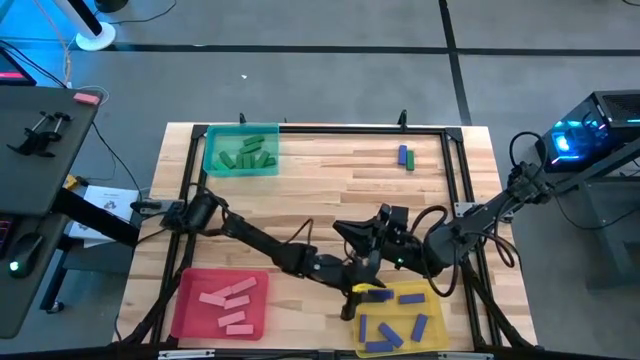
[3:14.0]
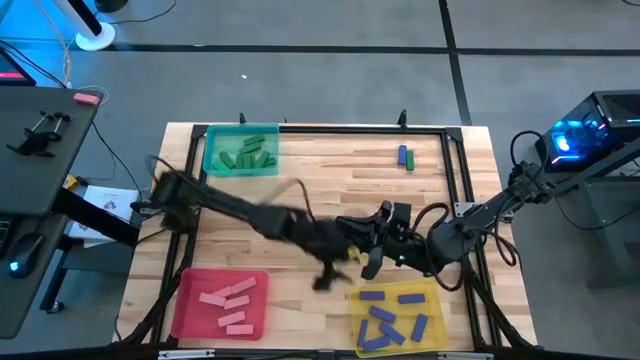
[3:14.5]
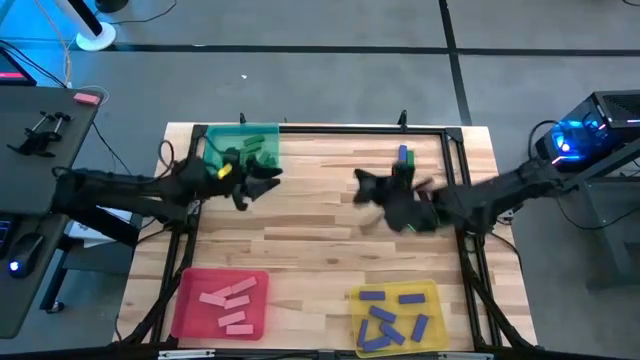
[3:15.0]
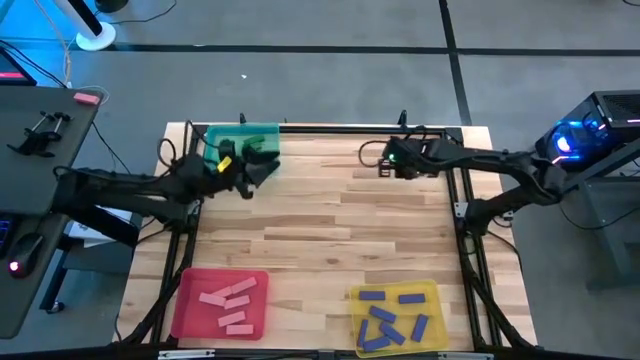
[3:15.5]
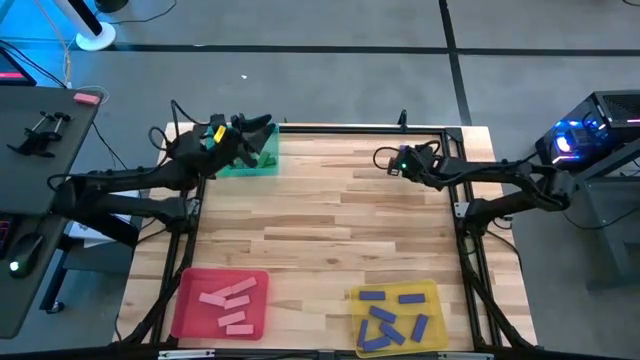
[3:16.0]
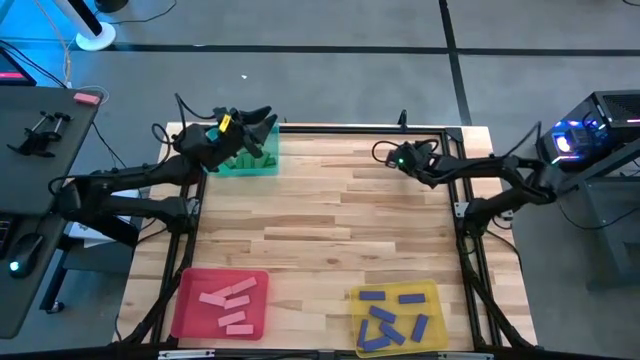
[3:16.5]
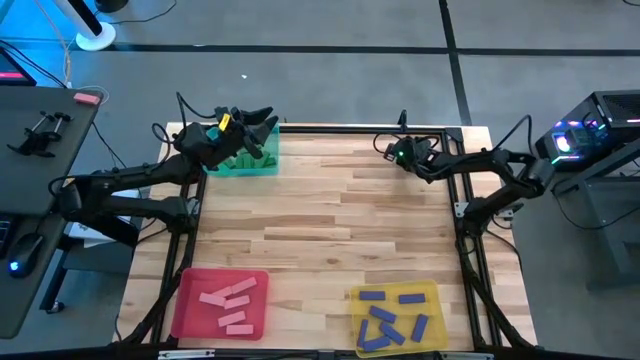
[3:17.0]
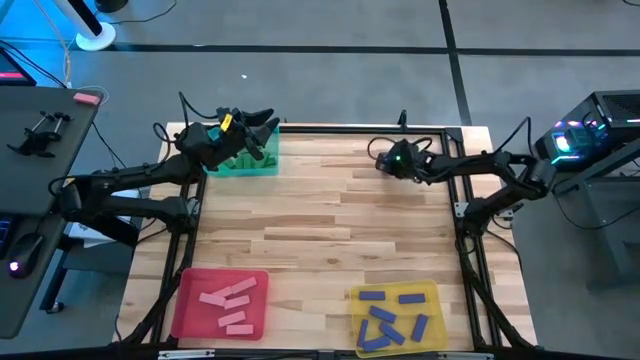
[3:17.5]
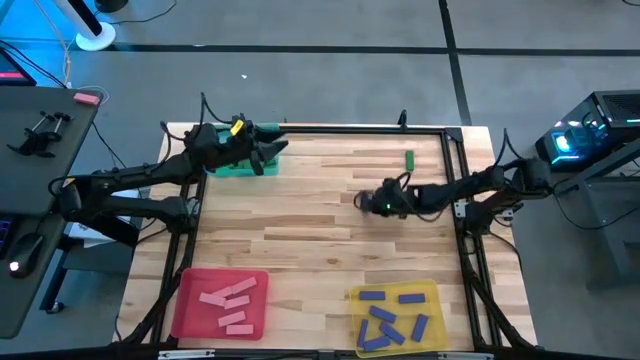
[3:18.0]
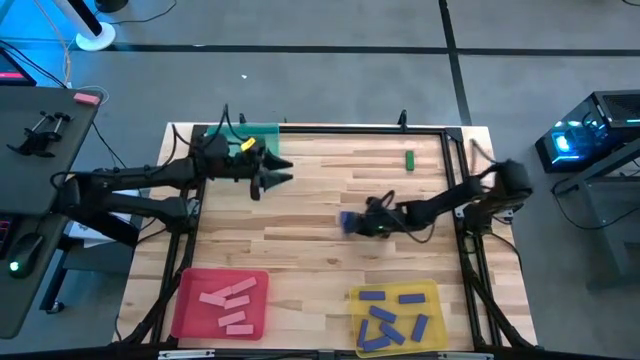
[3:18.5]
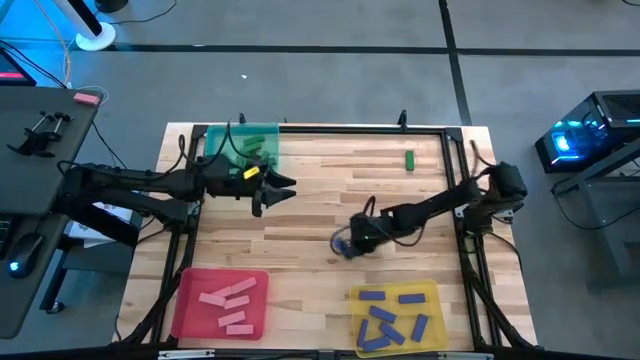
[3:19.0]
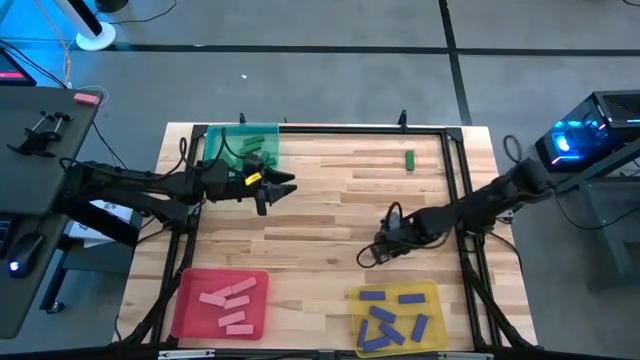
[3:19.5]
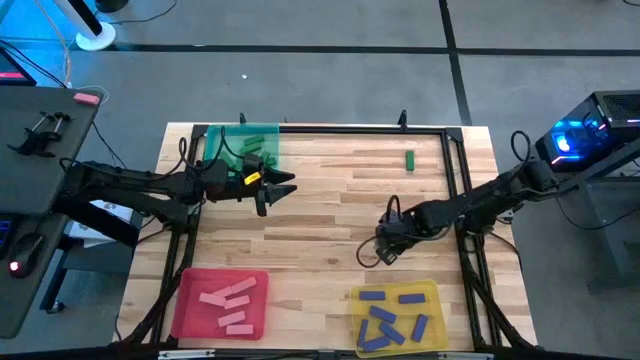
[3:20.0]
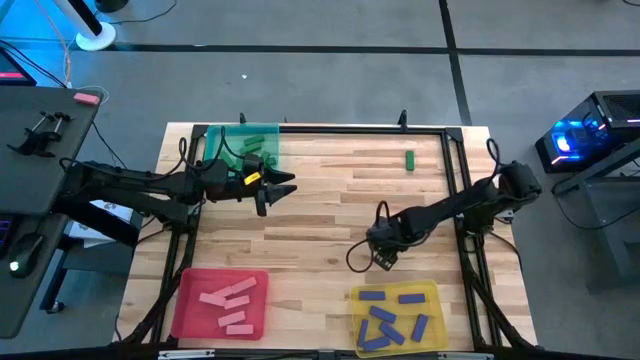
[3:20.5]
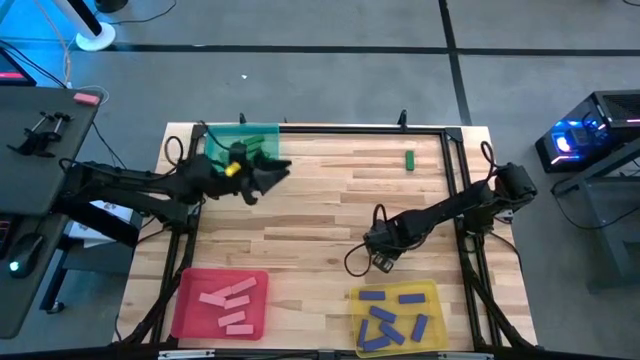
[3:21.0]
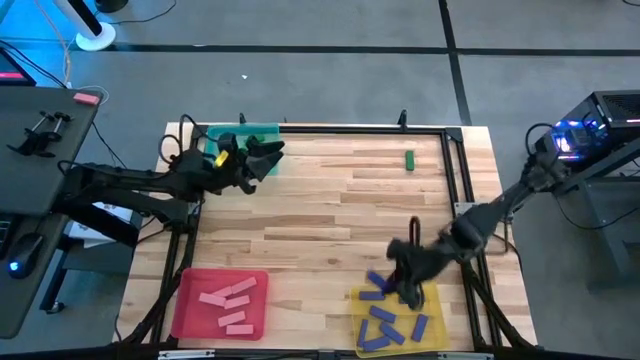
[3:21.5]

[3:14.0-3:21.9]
Task: Sort blocks
Put the blue block into the yellow bin

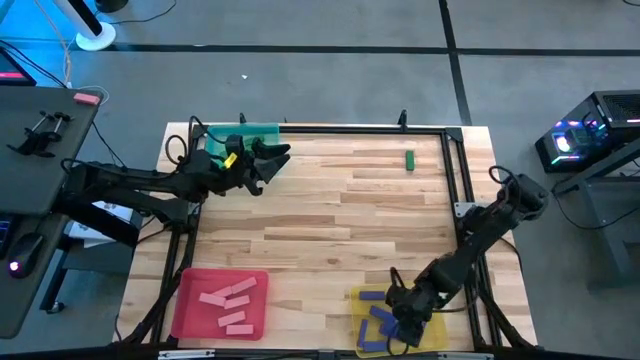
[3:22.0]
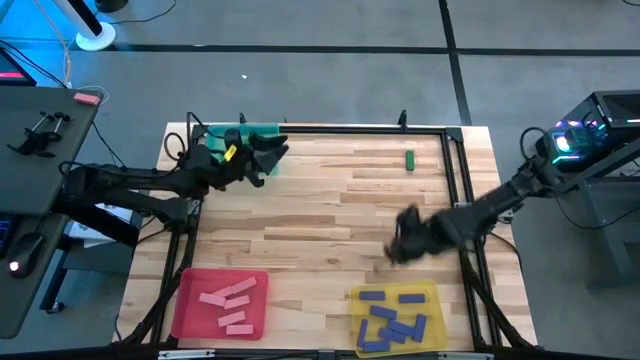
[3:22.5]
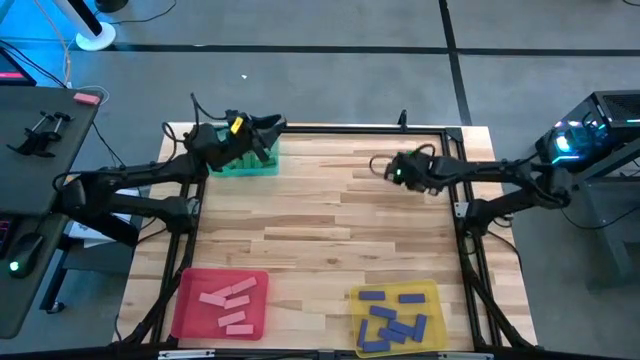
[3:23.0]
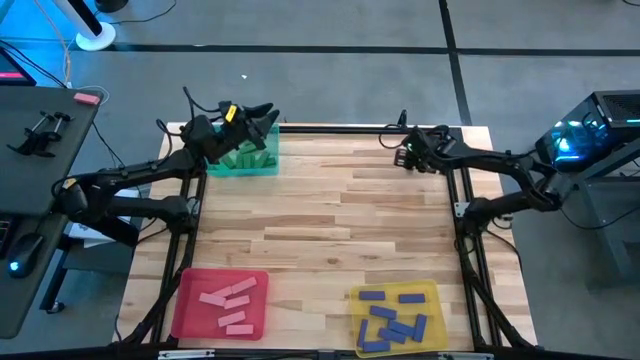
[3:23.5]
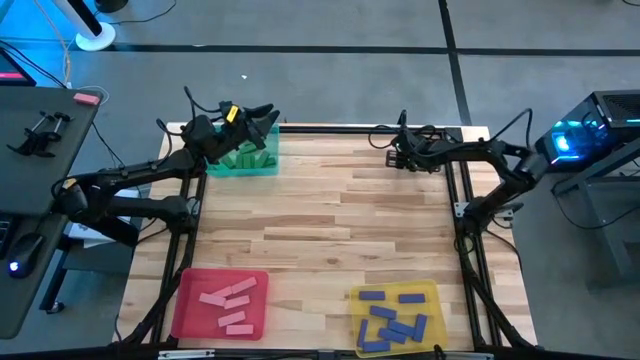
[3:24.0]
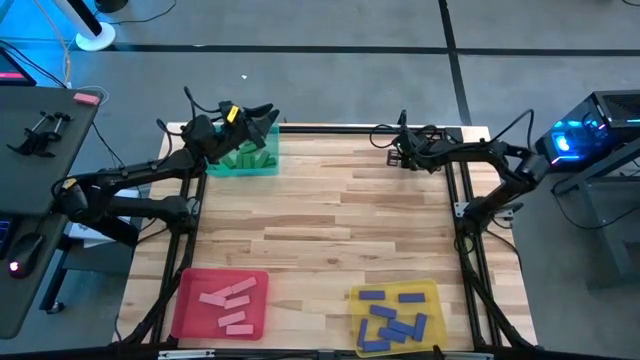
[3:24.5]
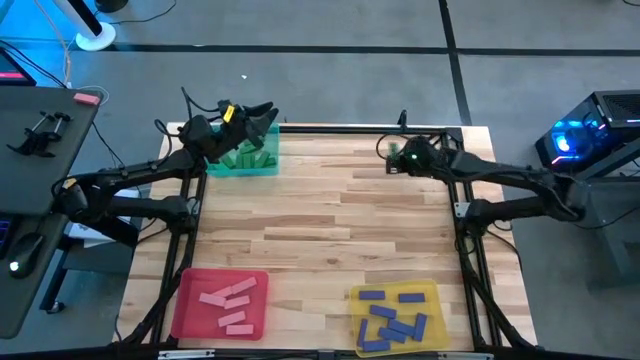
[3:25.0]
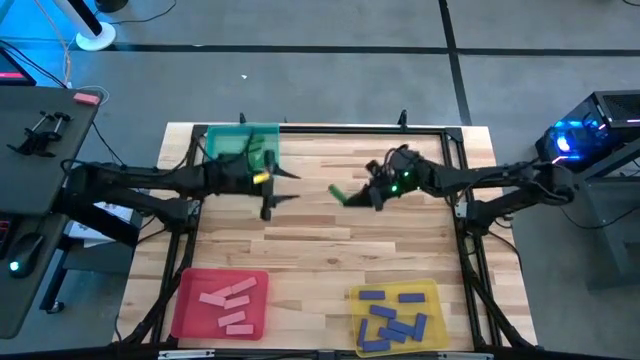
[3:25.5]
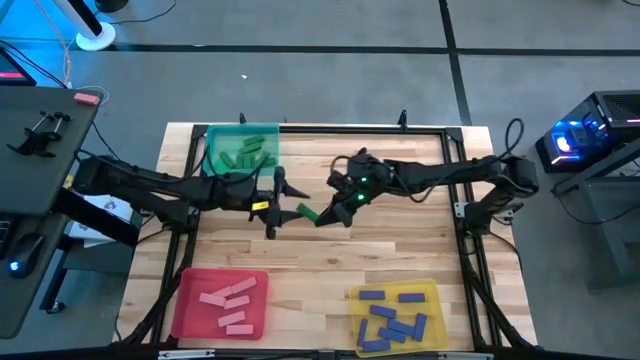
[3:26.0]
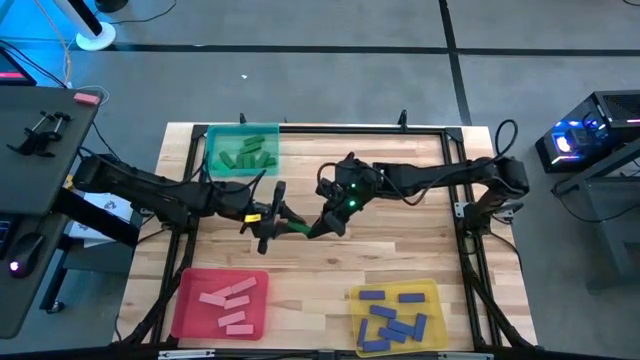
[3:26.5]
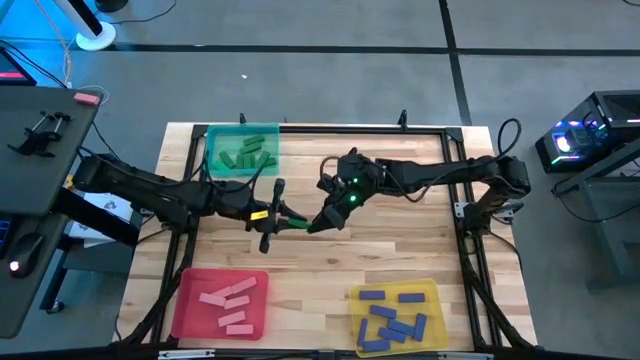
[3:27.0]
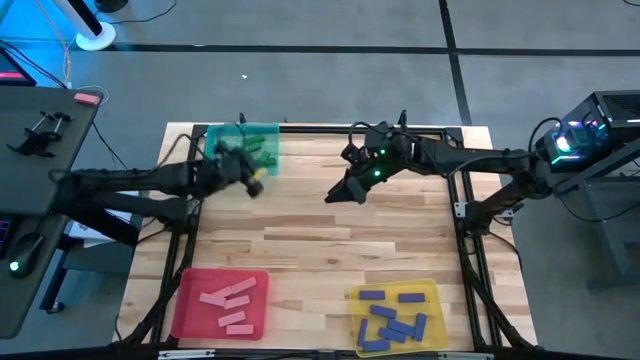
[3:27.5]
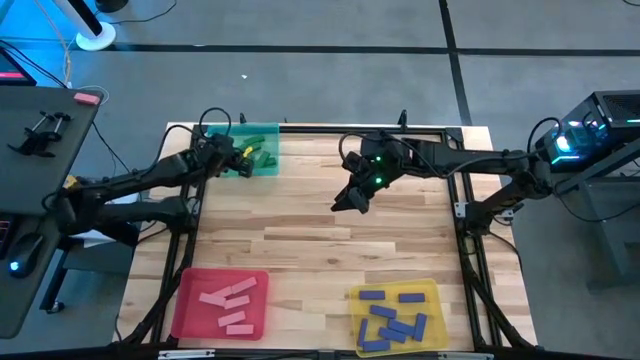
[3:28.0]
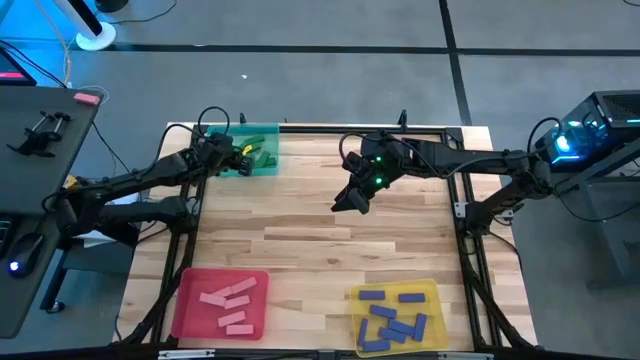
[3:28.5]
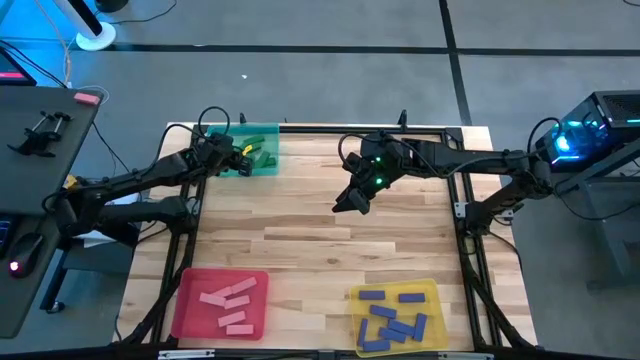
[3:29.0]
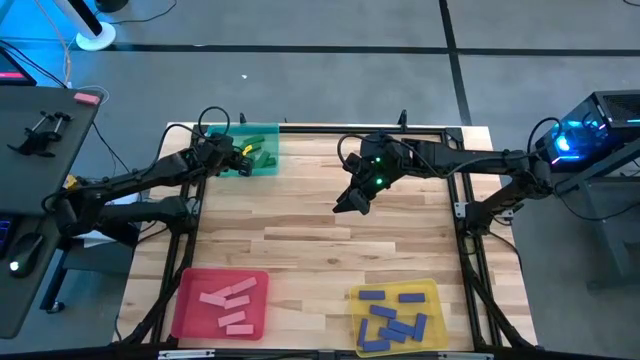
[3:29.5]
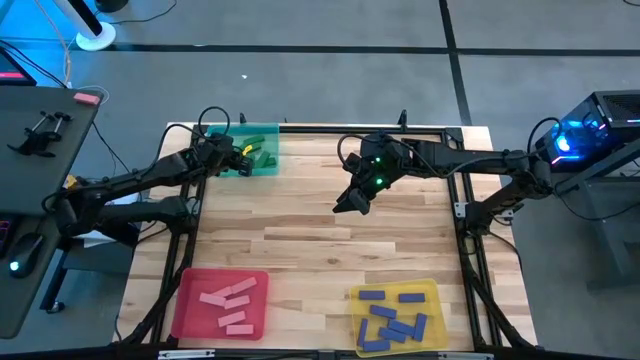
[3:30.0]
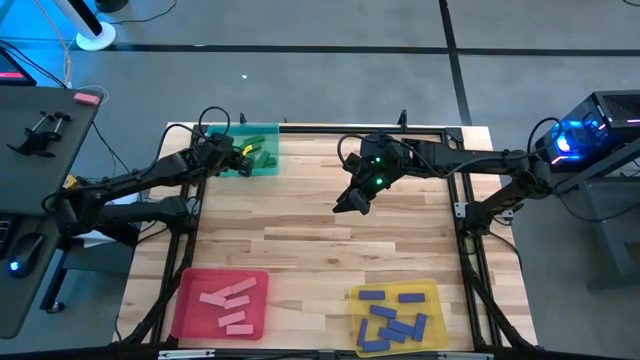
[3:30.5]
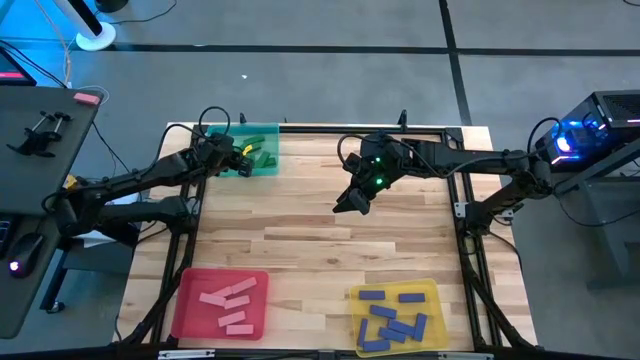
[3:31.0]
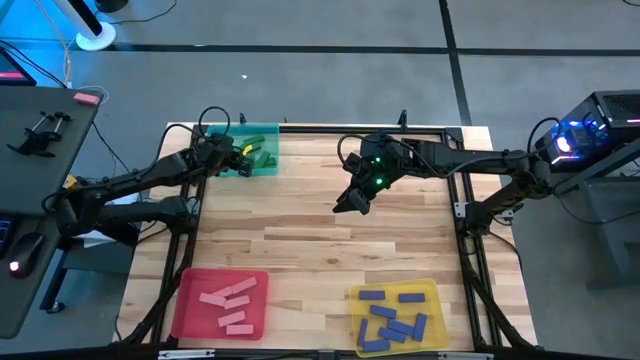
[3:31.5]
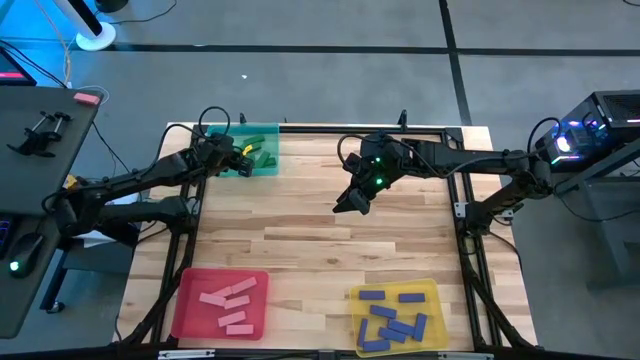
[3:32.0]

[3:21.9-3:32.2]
Put the green block into the green bin

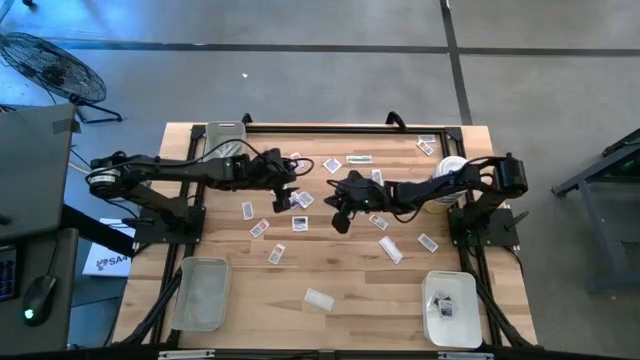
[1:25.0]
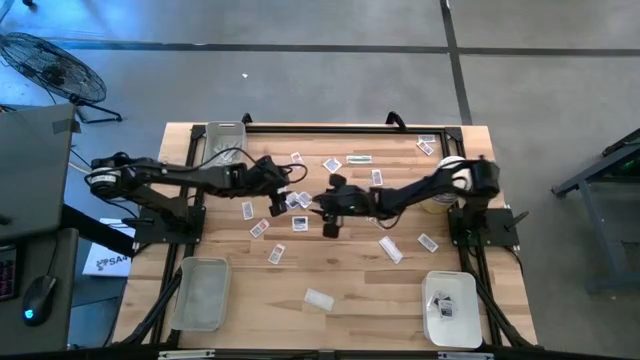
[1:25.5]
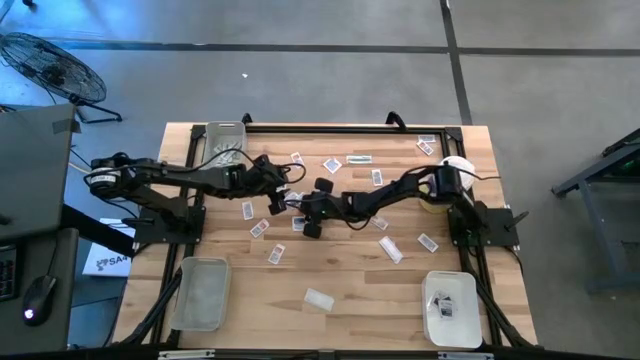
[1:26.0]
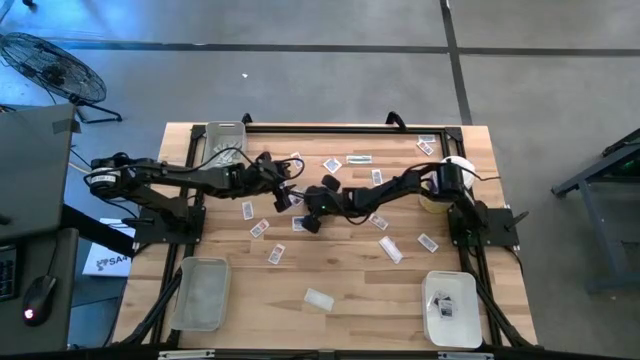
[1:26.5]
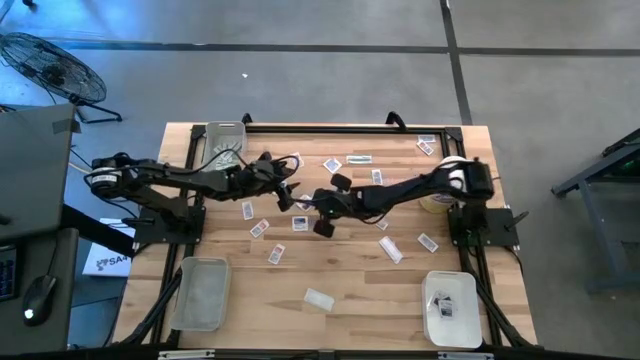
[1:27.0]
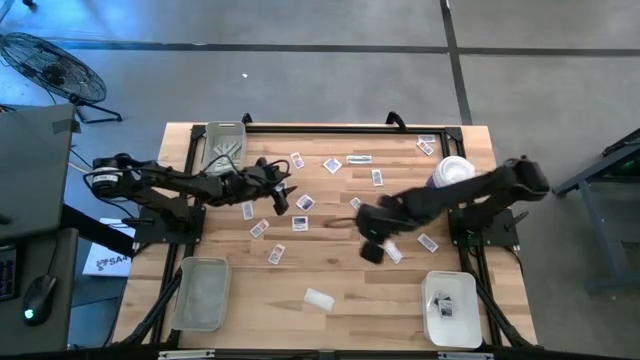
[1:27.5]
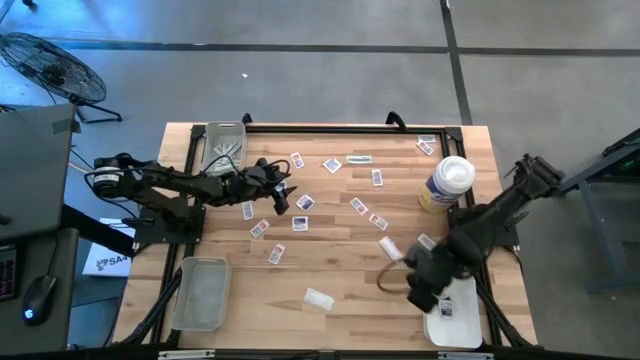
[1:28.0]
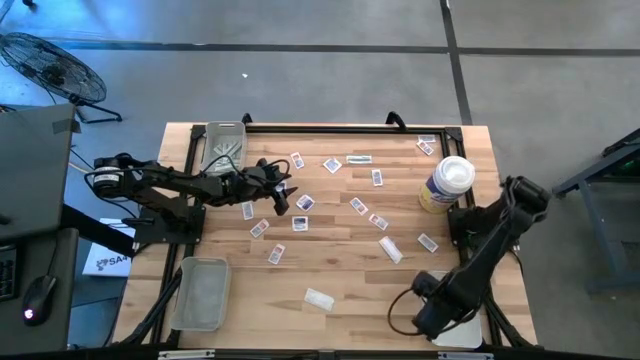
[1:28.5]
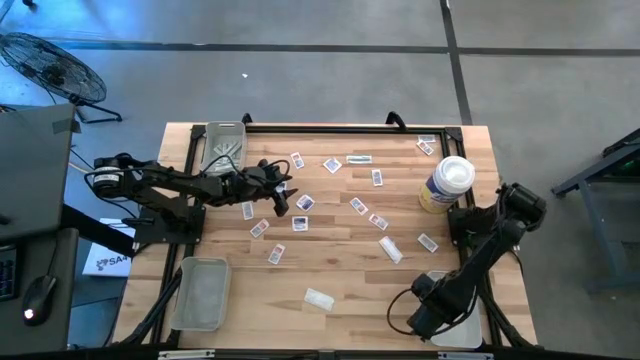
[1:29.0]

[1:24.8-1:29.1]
Task: Pick & Place First Aid Supplies
Put the blue alcohol pad into the white bin
